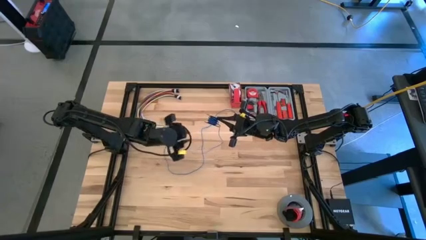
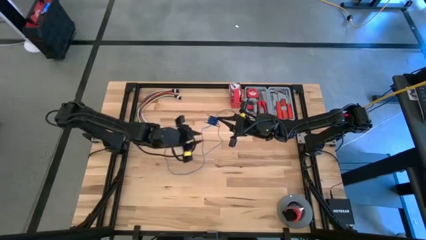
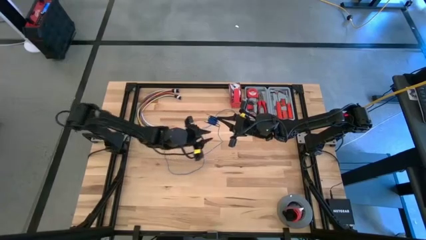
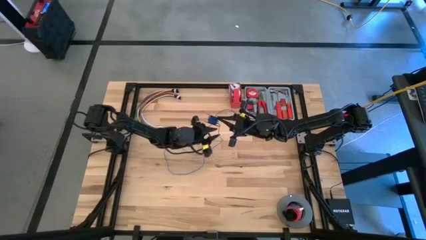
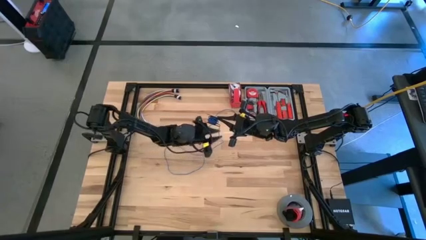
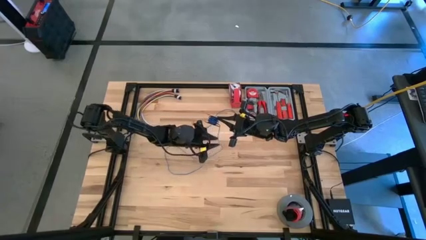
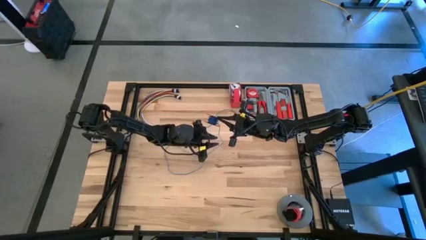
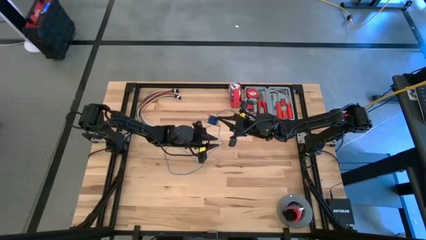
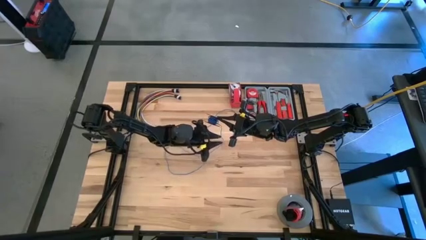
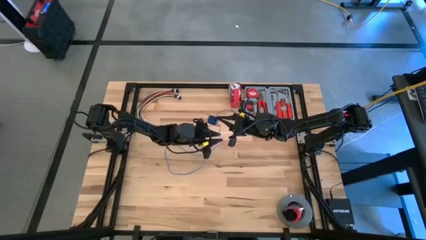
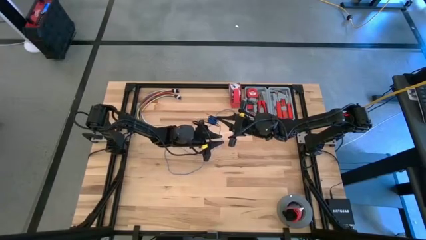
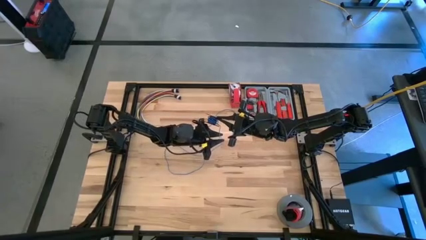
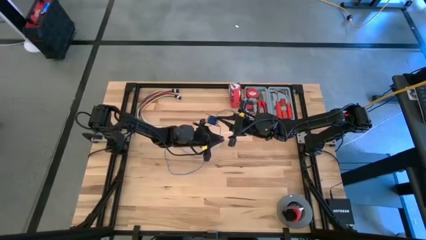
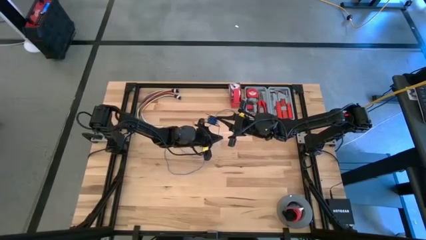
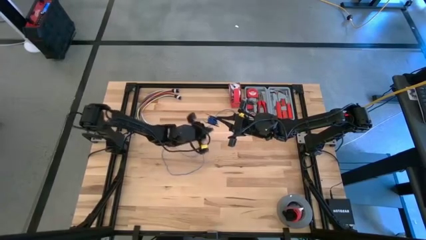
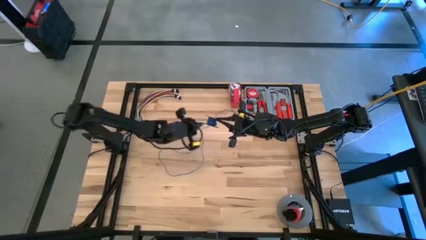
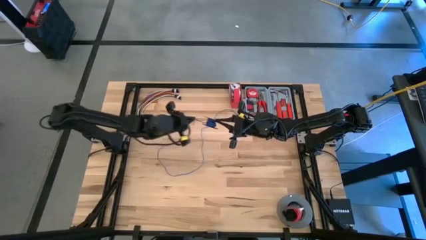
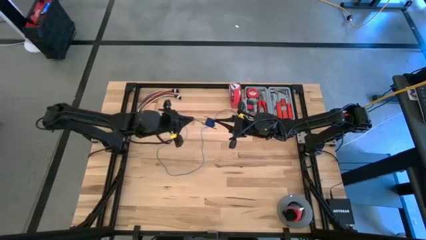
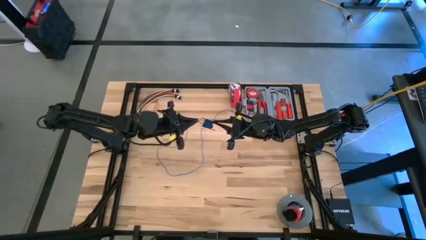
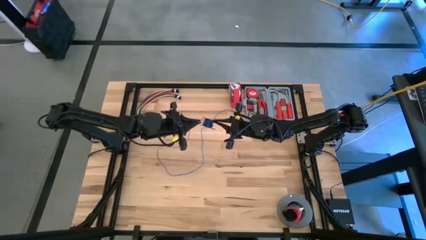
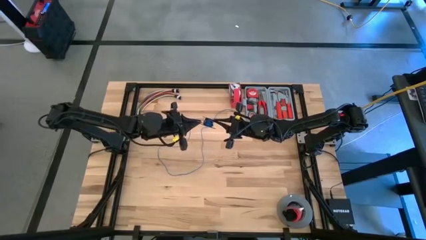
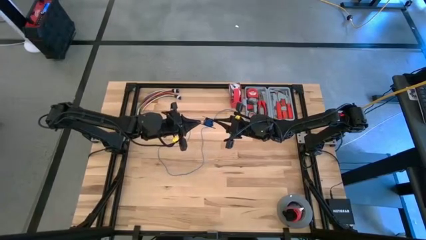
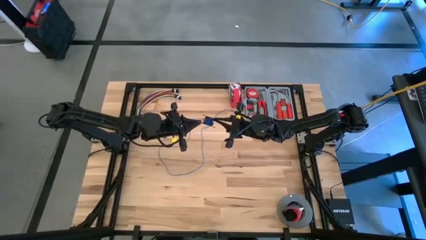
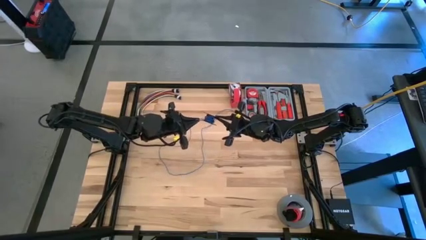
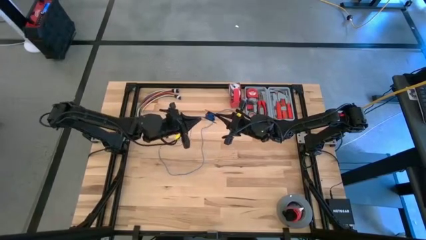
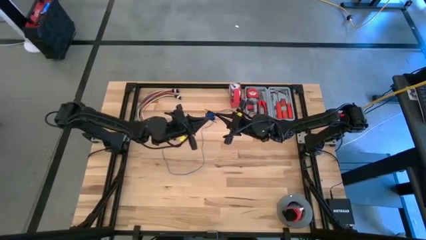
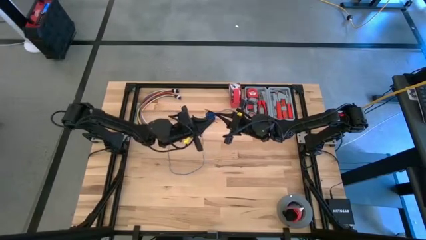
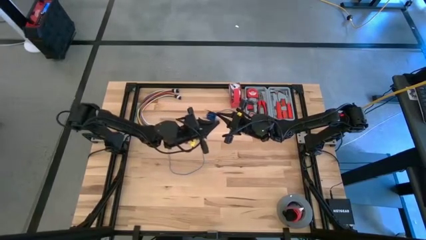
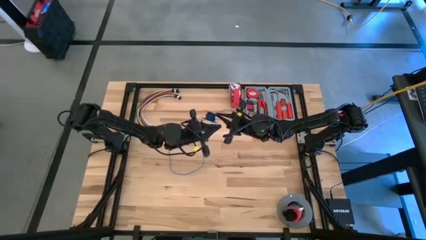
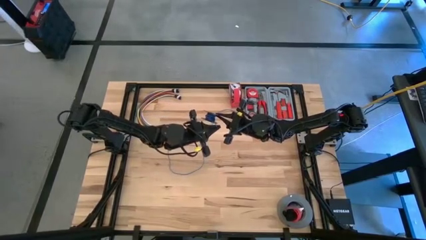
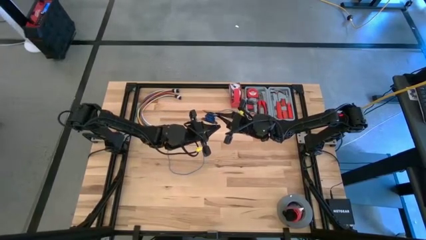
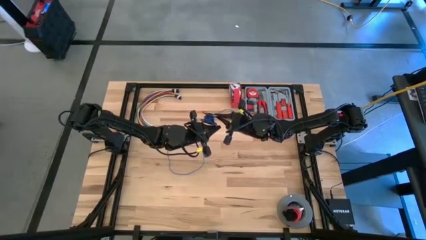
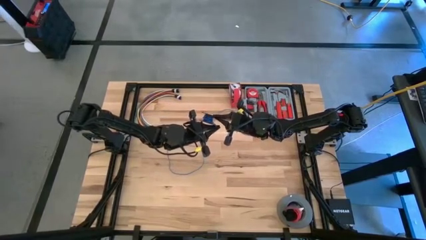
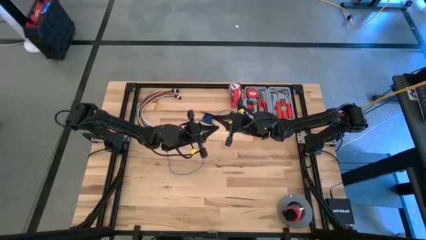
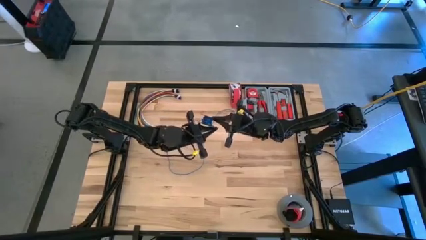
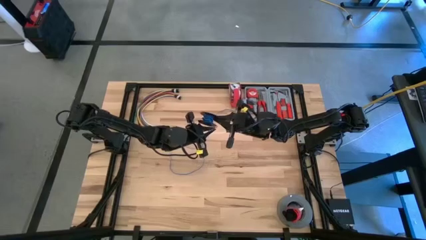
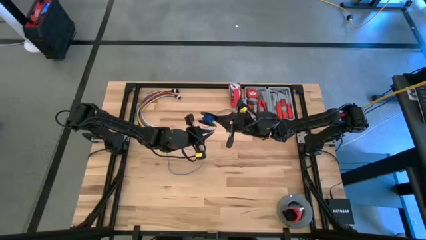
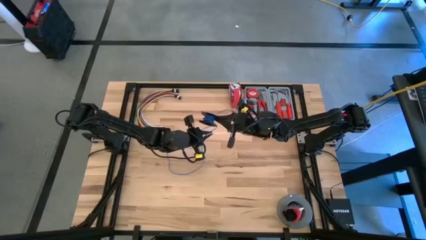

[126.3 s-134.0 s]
Task: Coil cords
Coil the blue wire on the black spool

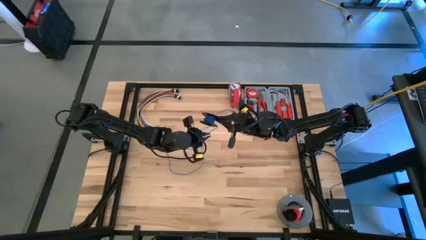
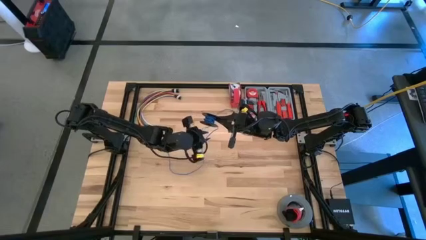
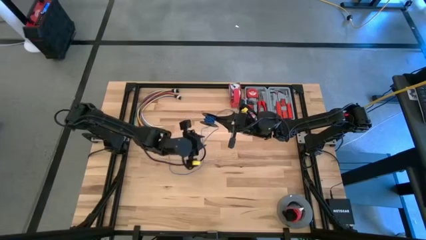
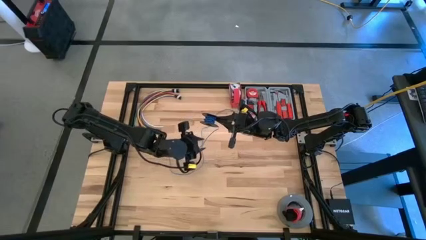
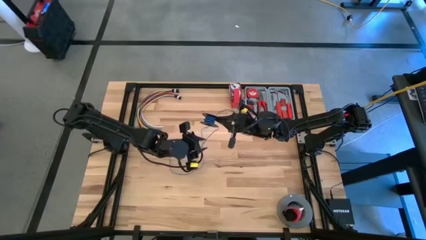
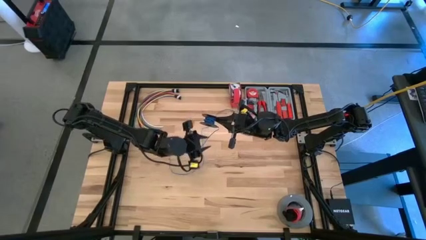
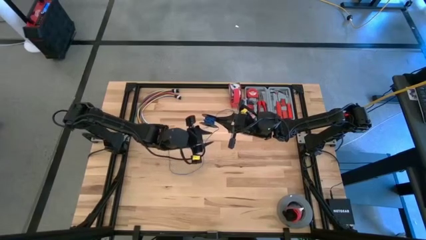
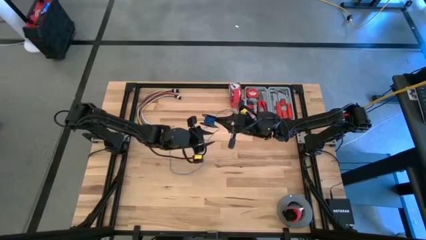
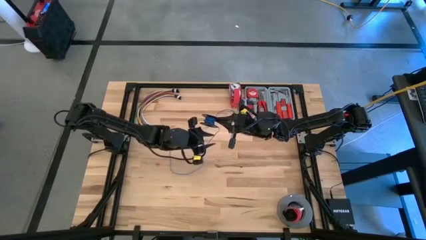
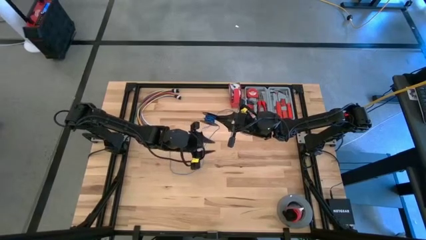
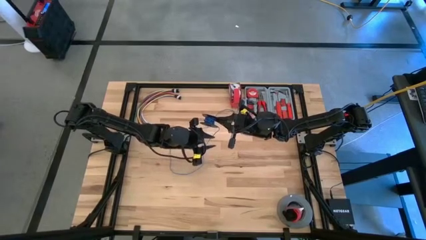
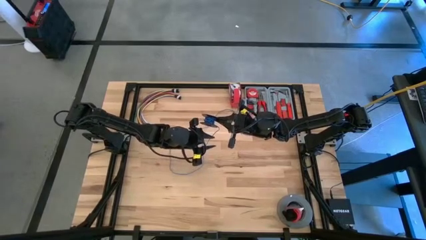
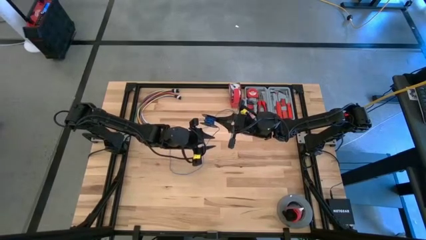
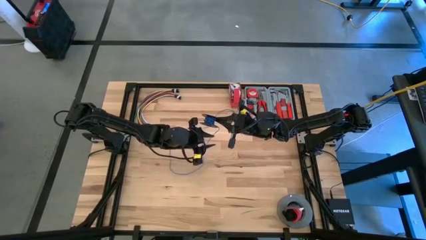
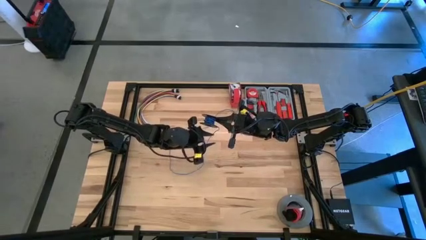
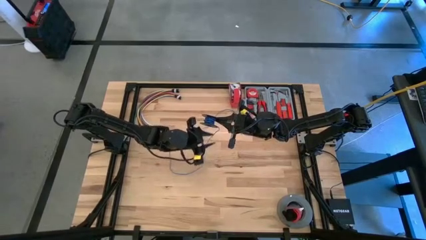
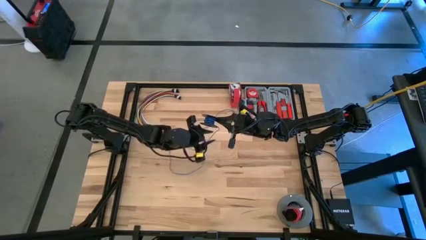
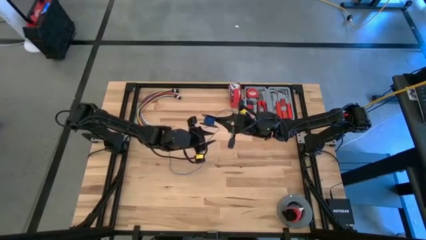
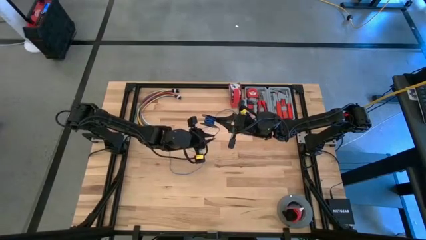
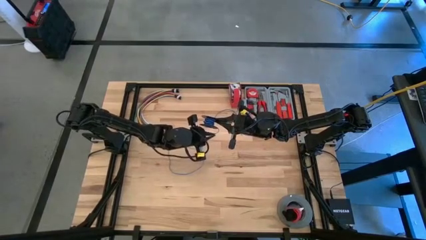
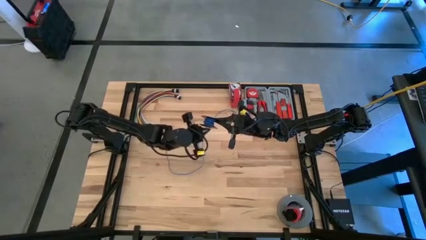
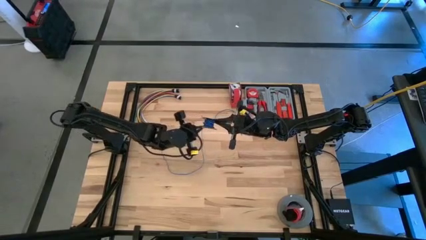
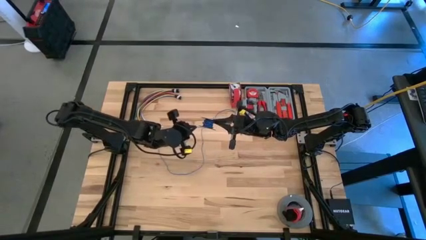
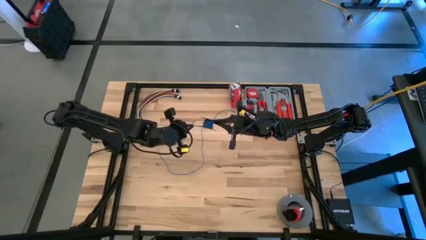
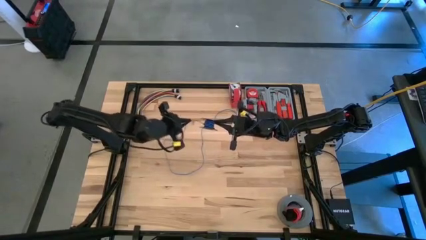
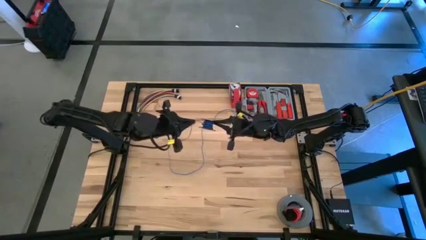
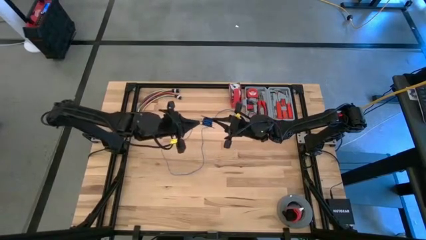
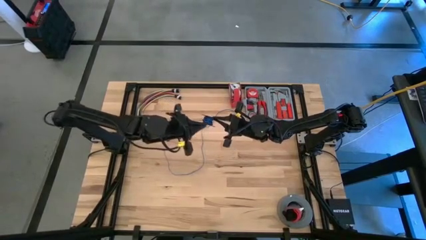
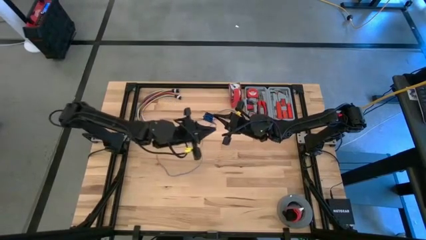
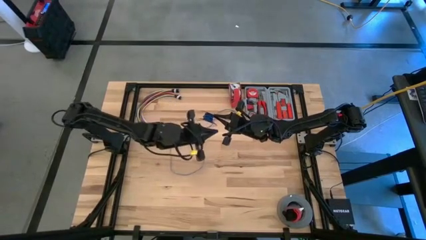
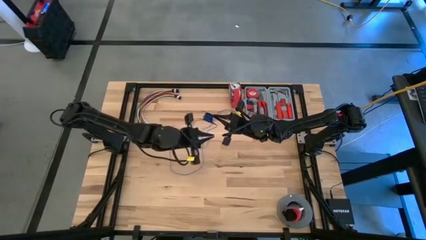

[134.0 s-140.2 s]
Coil the blue wire on the black spool

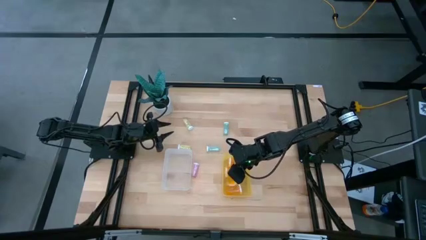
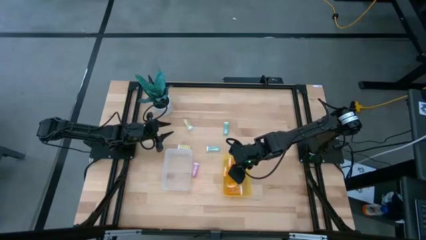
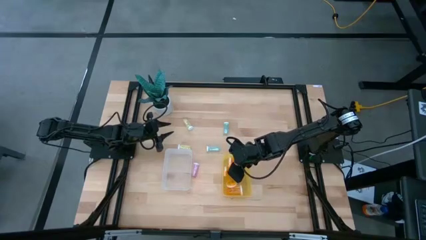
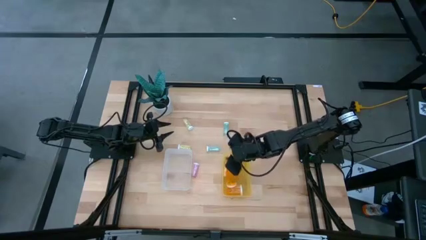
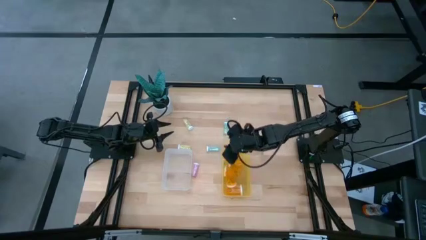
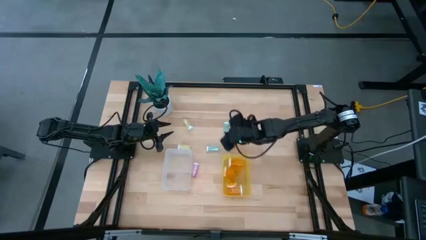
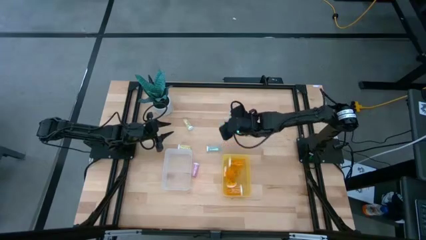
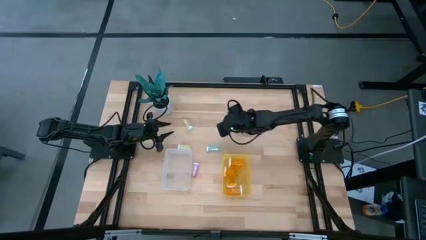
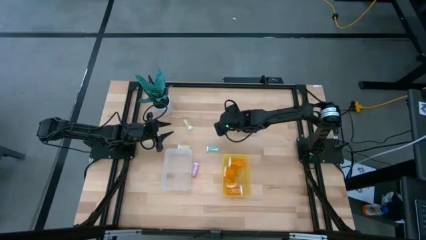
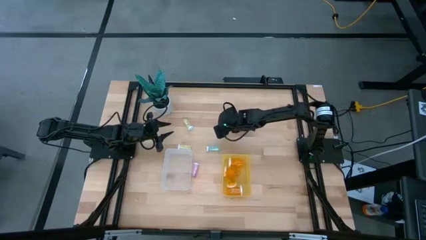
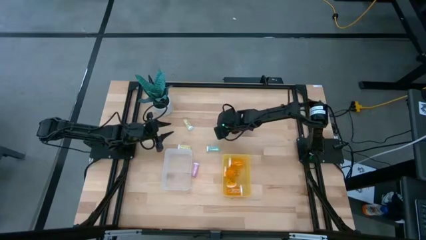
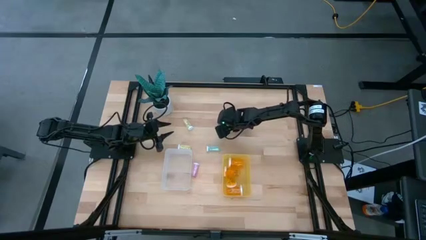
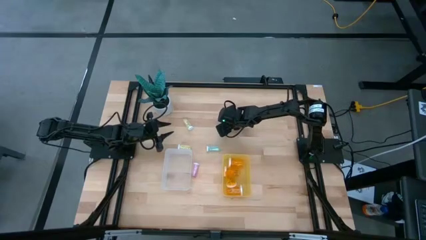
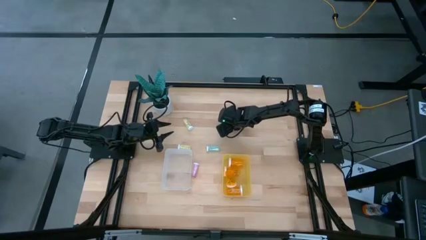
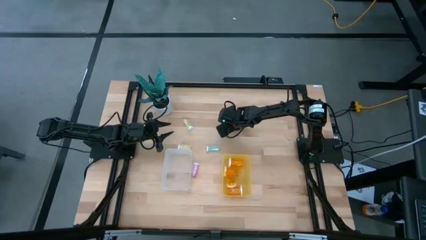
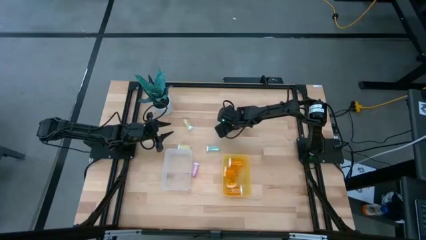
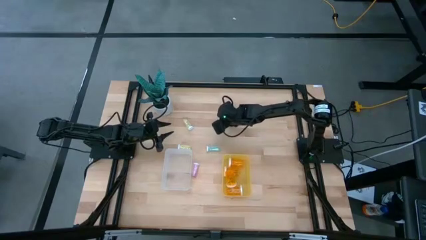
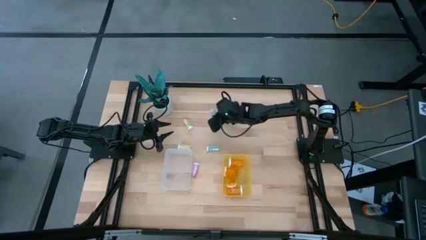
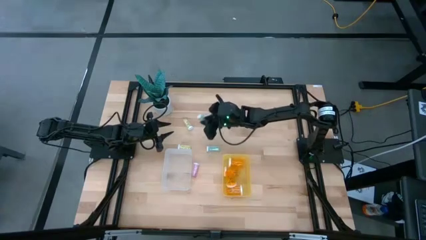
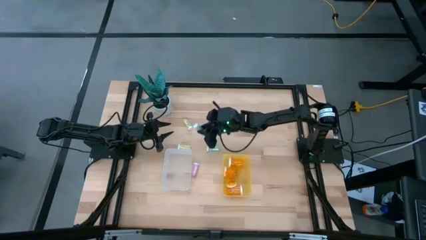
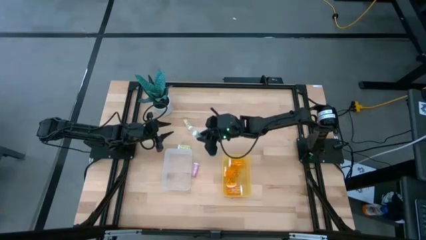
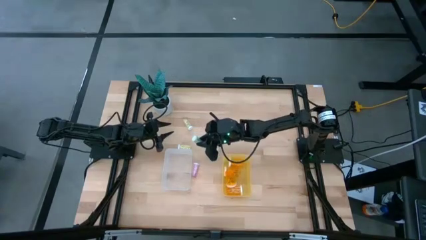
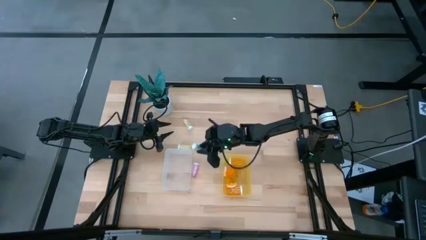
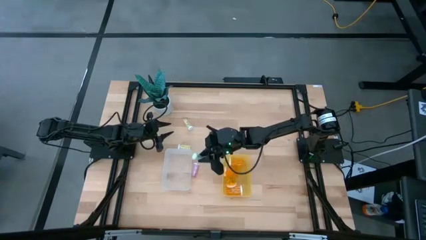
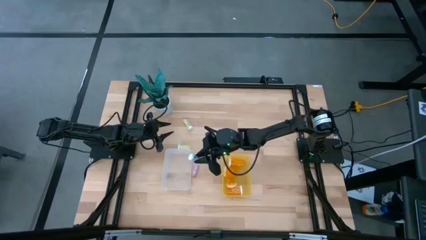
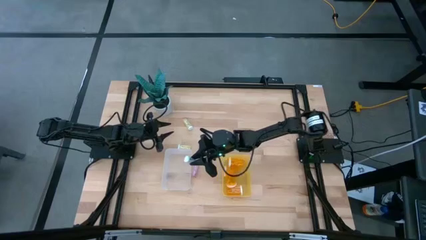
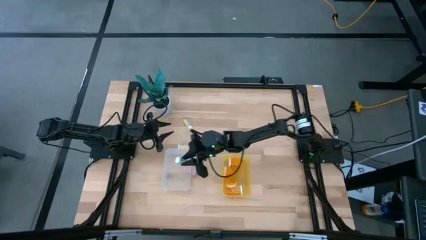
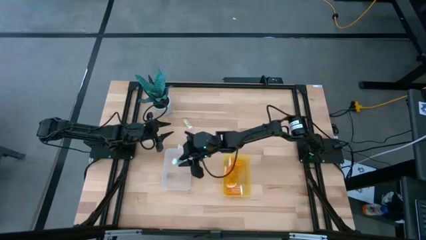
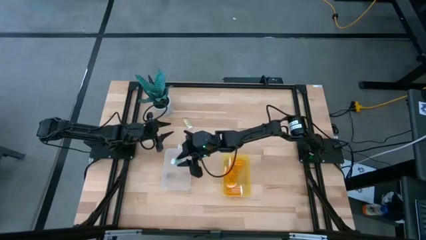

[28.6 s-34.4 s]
Task: Pick and place medicine bottles into bin by pill shape (circle, oval)
Put the top blue pill bottle into the transparent bin
